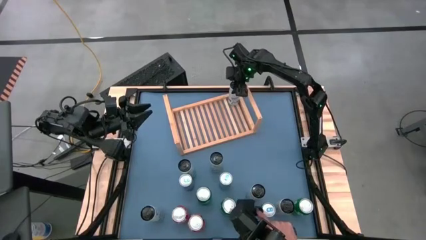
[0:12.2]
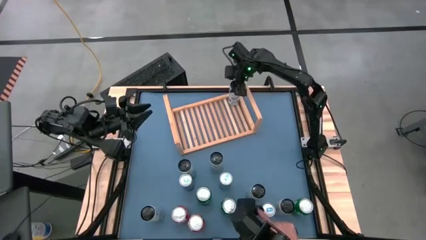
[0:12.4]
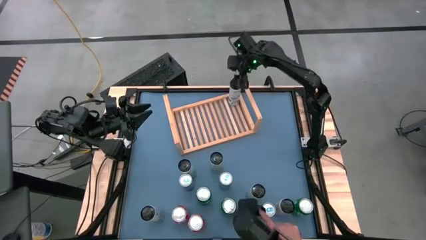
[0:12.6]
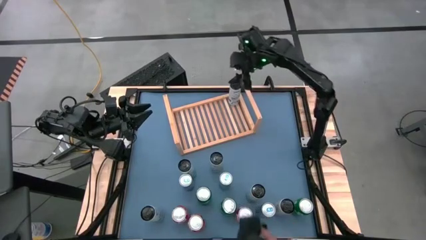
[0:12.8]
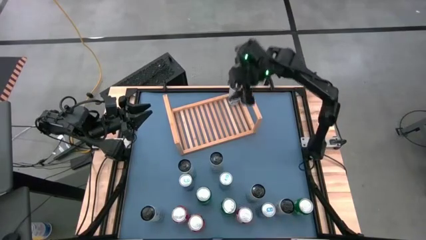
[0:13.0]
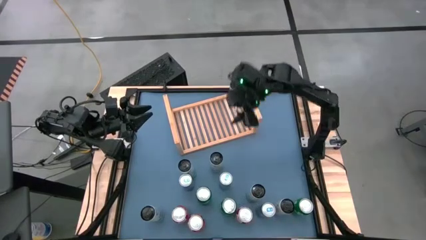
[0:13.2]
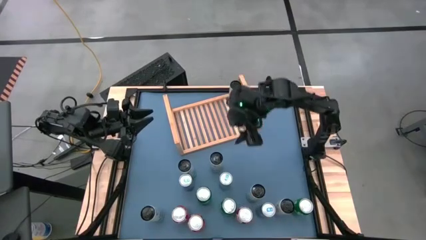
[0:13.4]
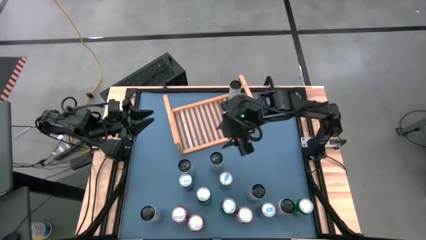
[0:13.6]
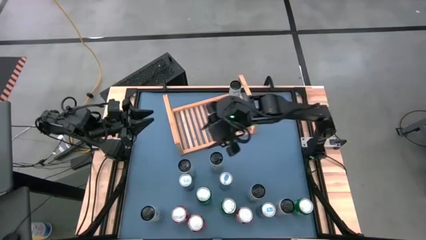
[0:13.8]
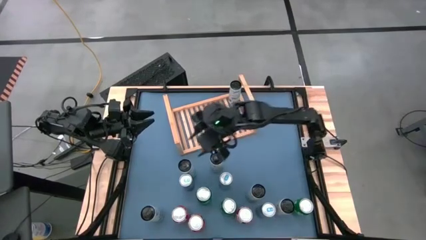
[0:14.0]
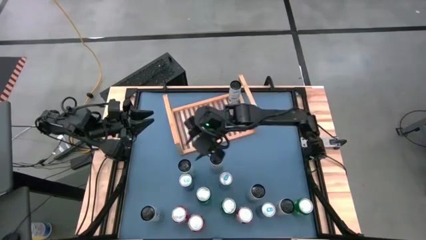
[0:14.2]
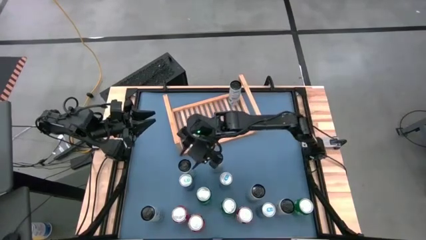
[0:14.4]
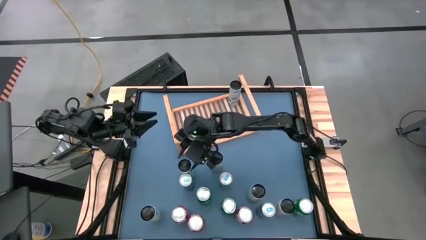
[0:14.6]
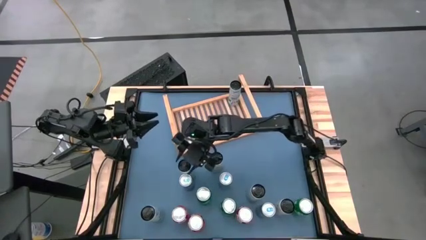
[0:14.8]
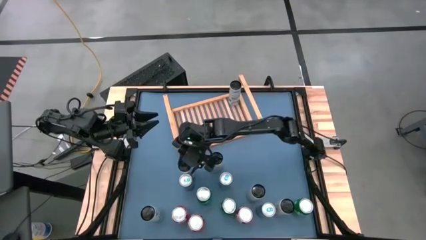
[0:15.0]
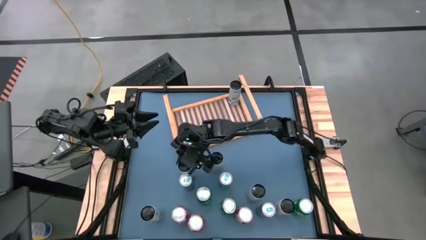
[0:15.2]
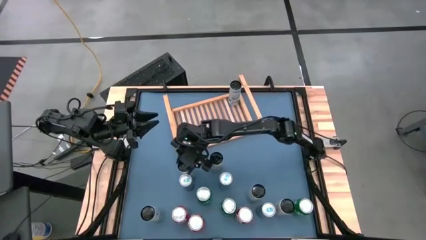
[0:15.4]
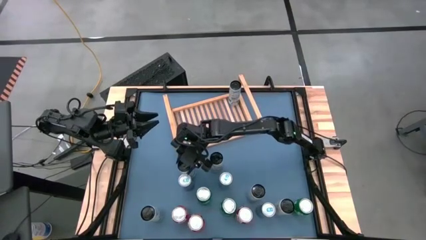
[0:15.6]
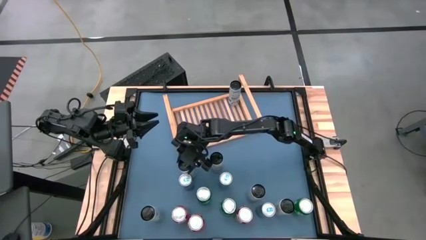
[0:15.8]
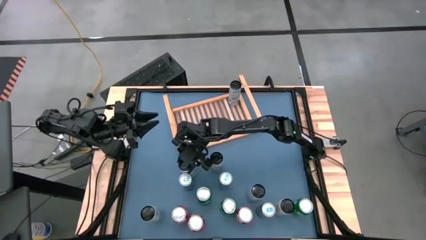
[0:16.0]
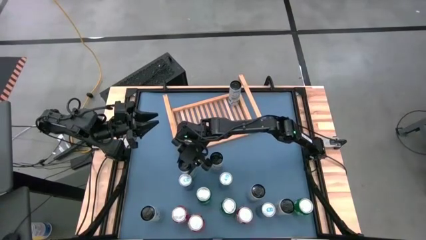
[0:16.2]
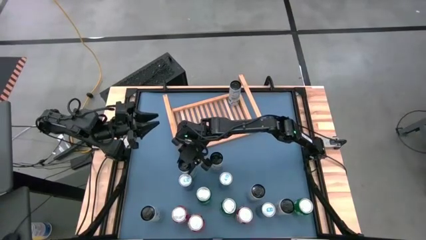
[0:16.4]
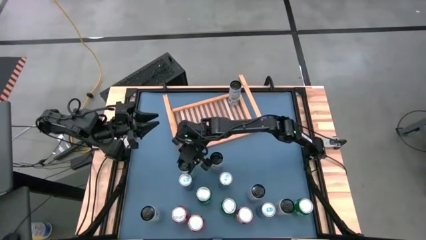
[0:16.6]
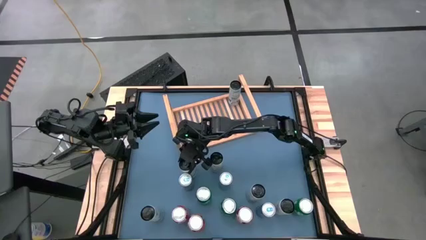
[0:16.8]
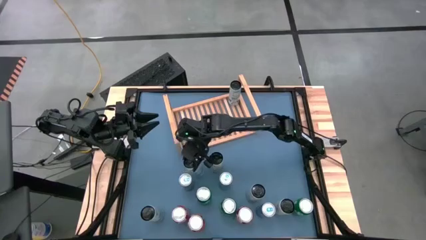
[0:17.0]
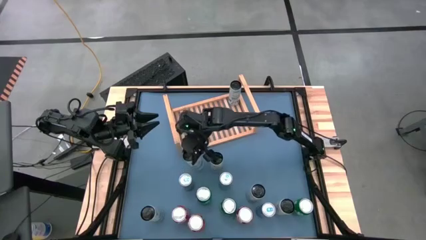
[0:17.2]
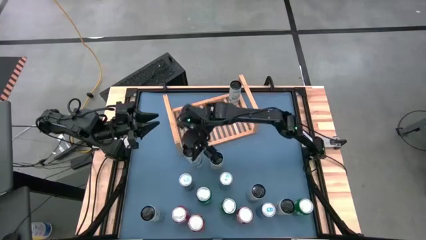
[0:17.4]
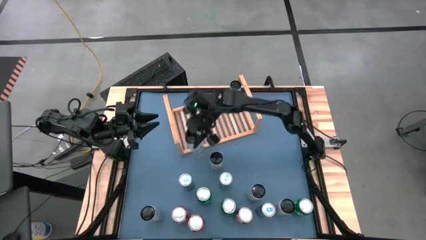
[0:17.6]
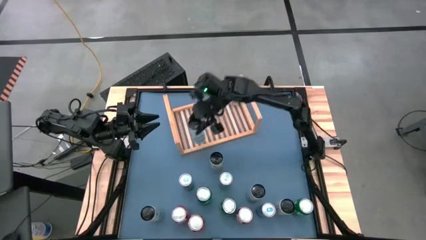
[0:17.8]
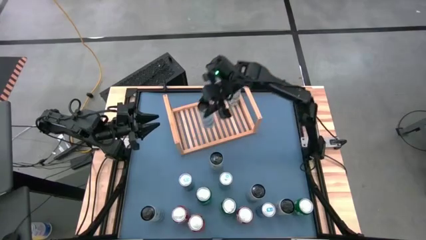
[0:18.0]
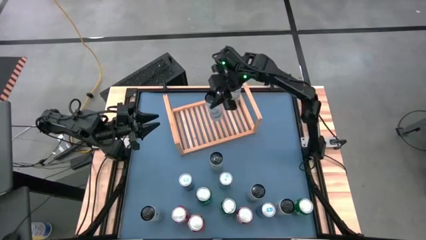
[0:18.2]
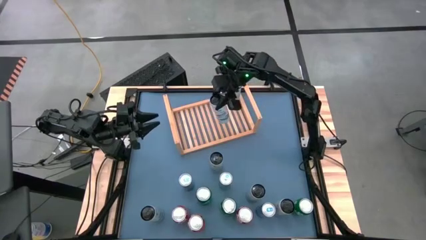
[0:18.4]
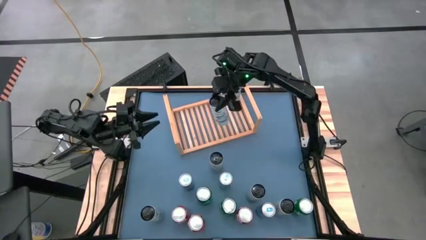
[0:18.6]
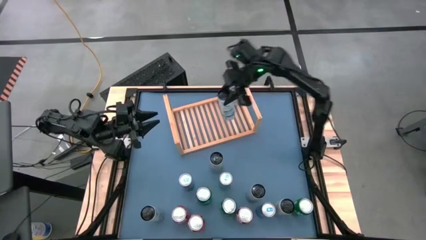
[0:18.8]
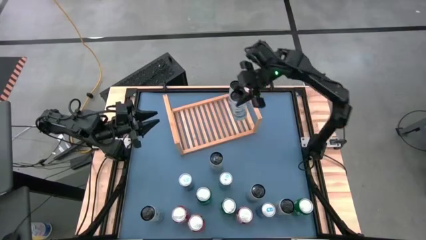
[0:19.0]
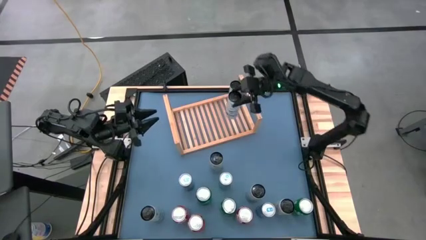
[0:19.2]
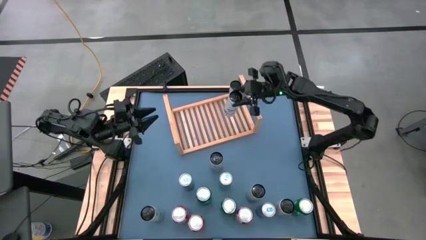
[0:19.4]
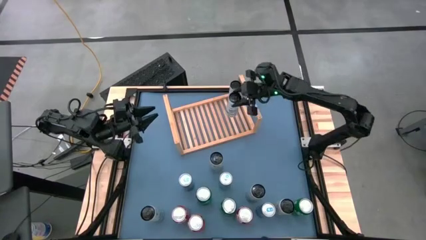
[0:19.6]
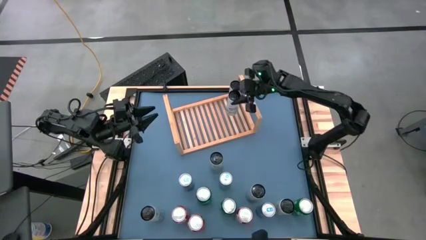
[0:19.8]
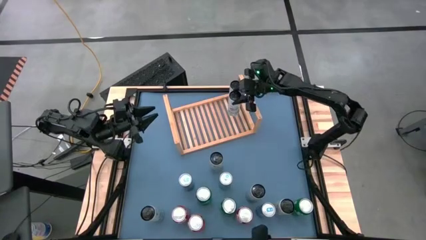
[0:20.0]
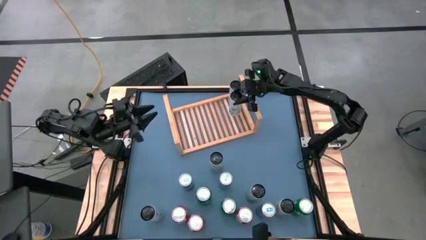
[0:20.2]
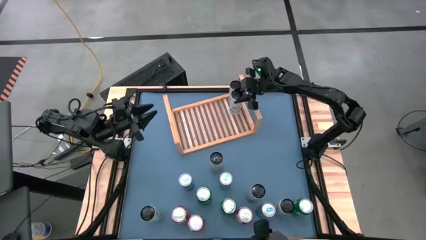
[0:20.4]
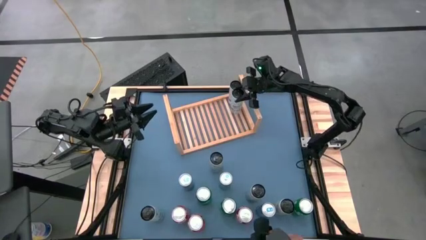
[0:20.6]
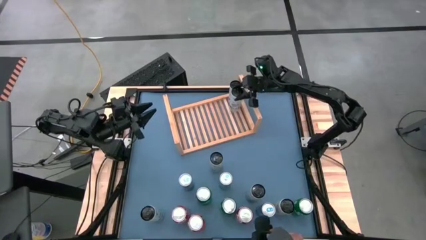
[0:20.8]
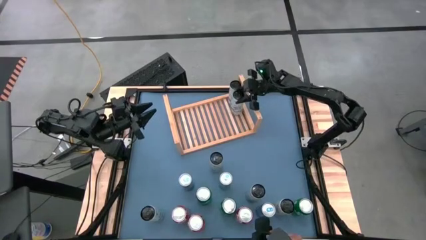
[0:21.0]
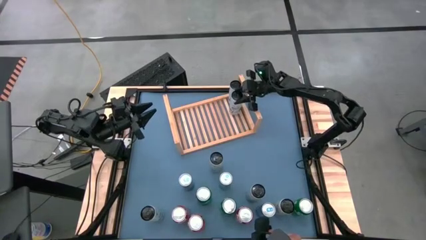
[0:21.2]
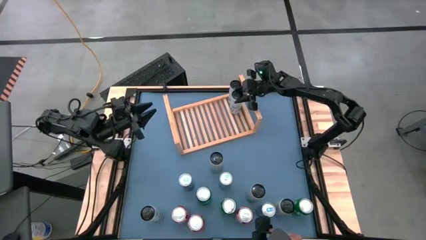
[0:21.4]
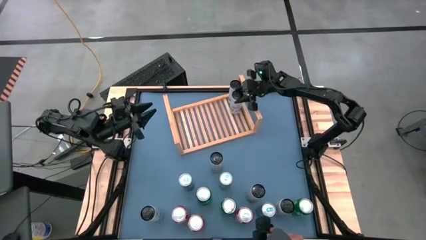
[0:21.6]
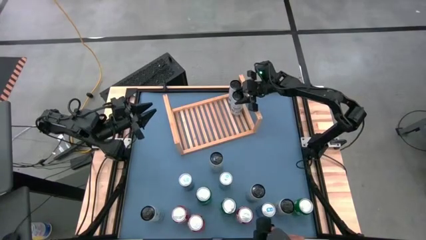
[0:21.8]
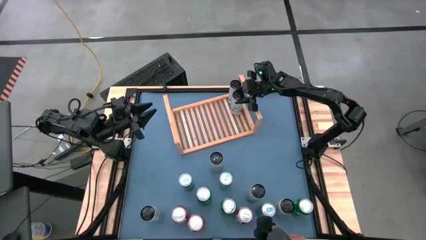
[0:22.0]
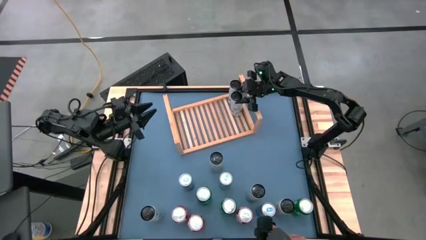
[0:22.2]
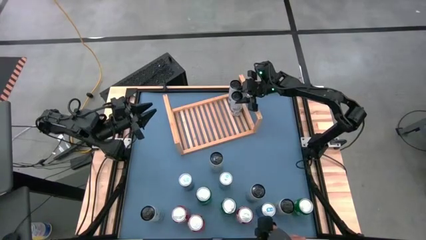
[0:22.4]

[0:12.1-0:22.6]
Task: Place canned beverage on shelf
Put the white-blue soda can on the shelf aligned with the other white-blue soda can
